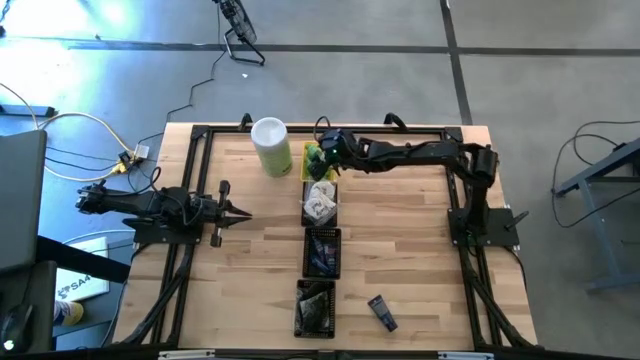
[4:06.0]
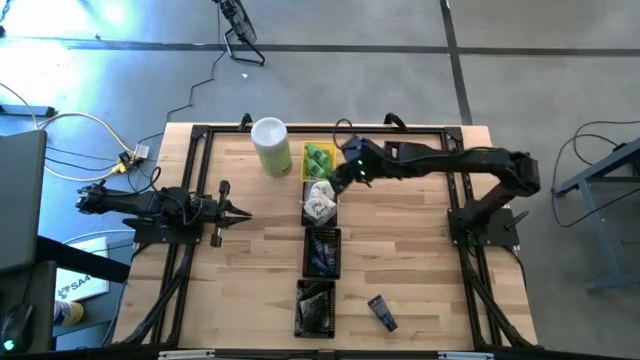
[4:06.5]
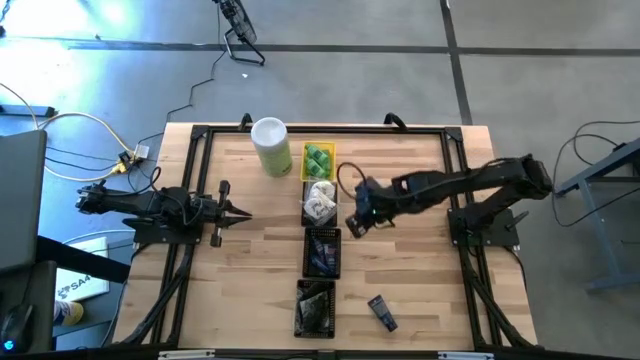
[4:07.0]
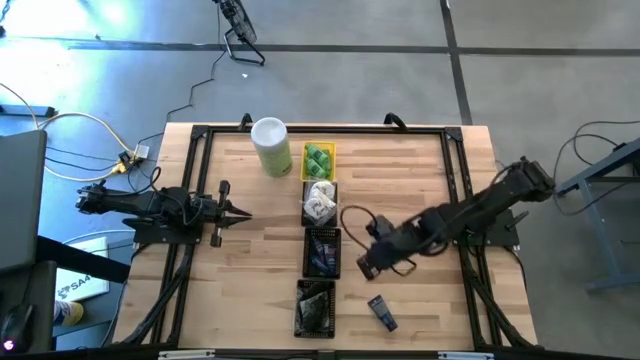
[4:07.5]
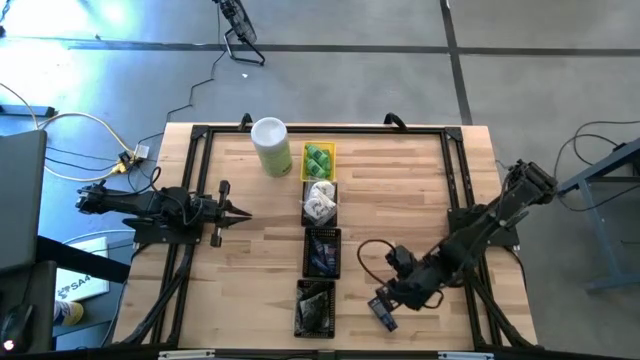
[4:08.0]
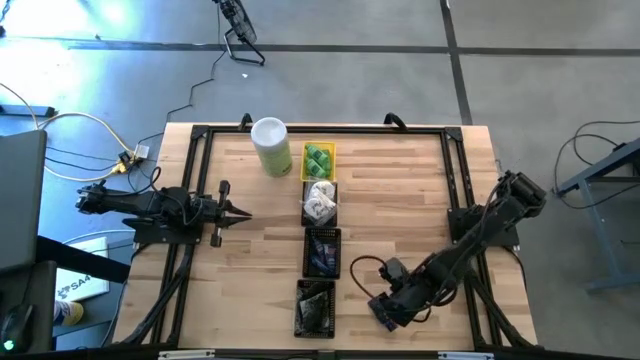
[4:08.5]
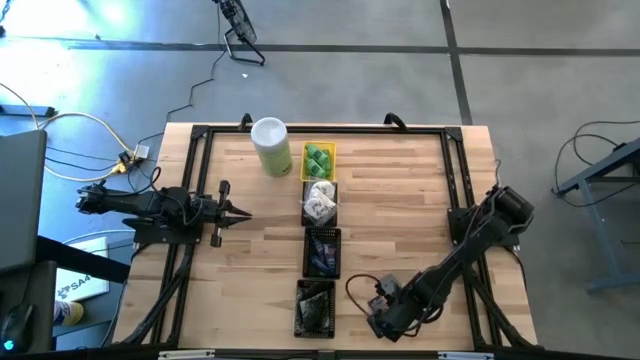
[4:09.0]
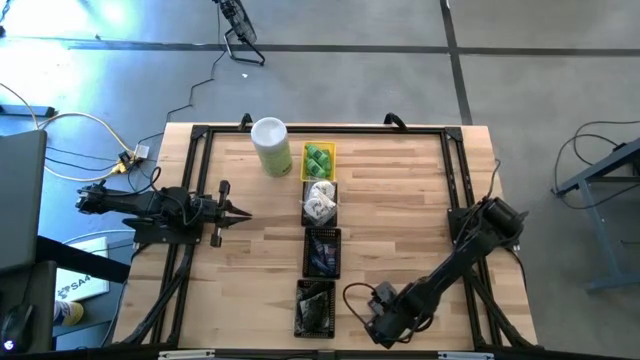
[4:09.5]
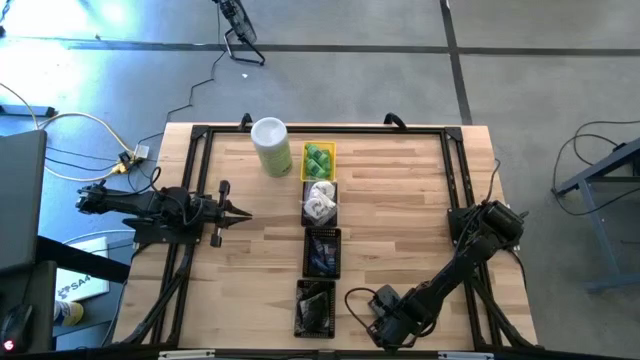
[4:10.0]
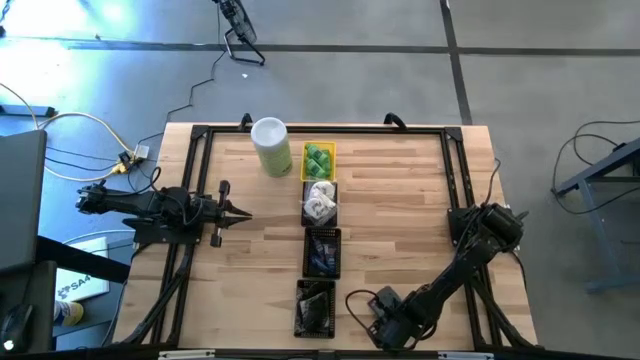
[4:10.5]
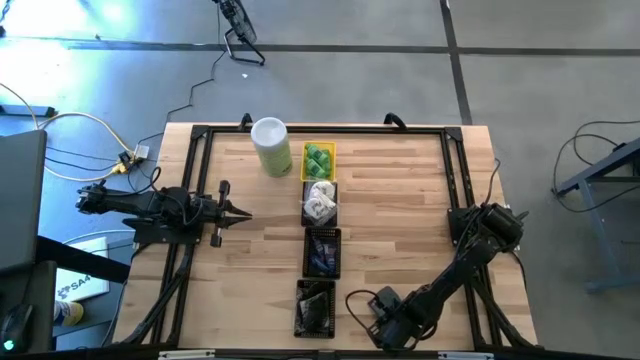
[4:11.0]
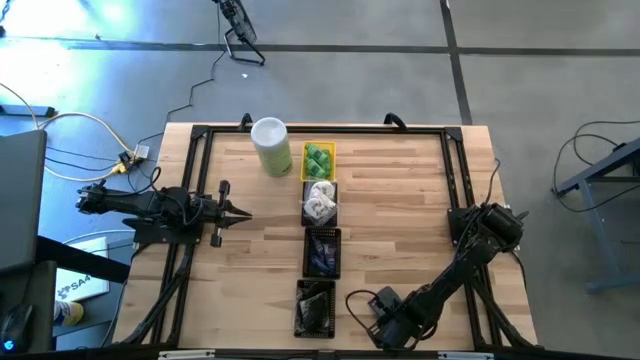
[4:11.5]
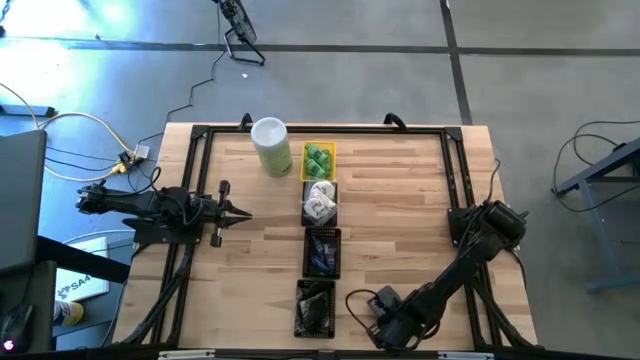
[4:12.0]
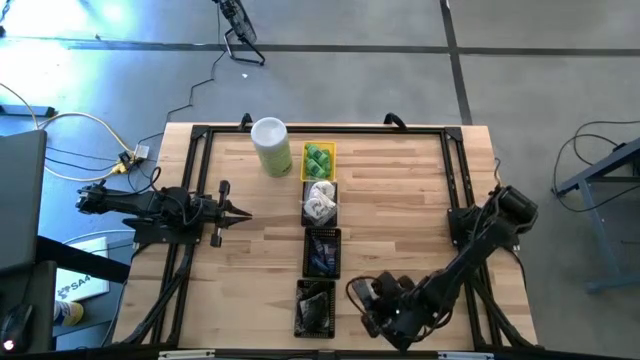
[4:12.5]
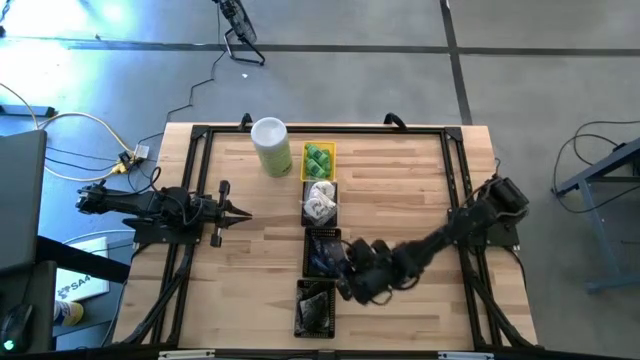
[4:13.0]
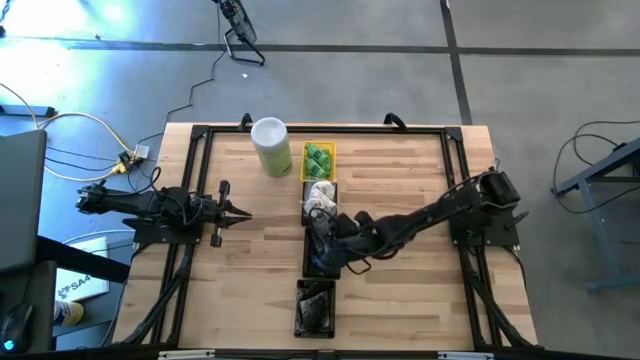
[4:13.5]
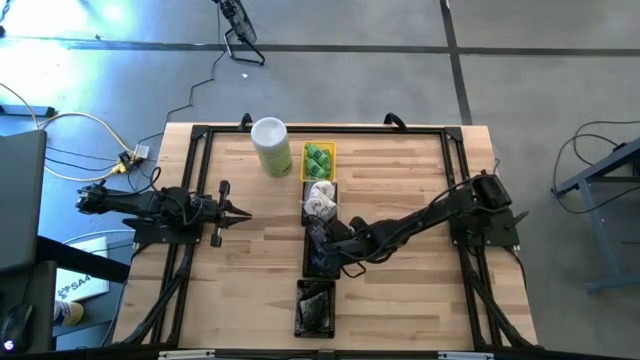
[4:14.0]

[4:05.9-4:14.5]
Task: Pick & Place Travel size toiletries
Put the dark blue bottle into the middle black basket

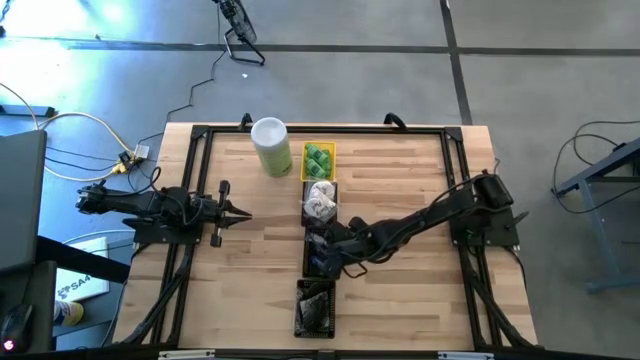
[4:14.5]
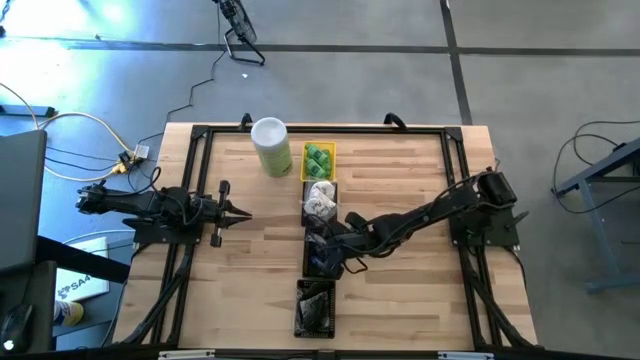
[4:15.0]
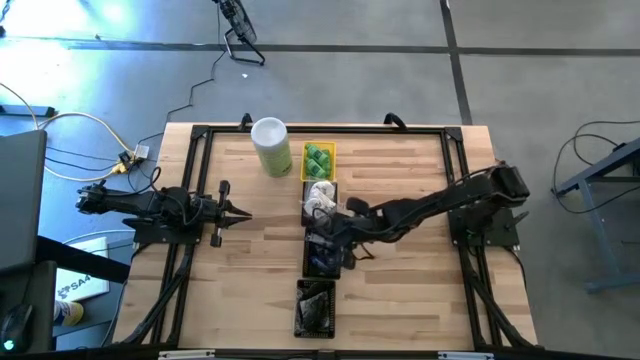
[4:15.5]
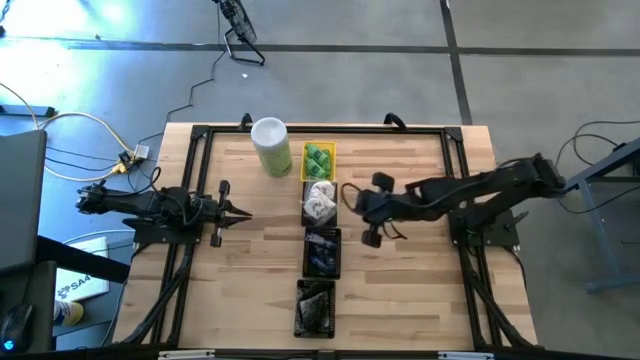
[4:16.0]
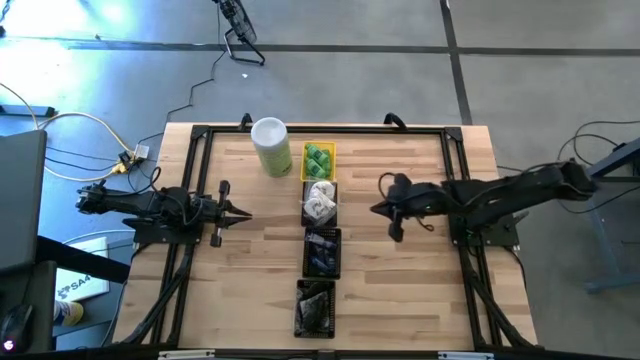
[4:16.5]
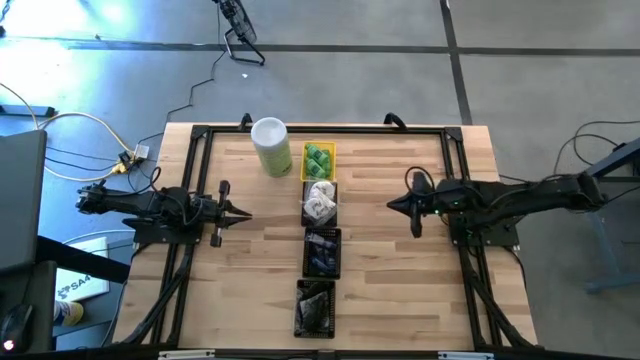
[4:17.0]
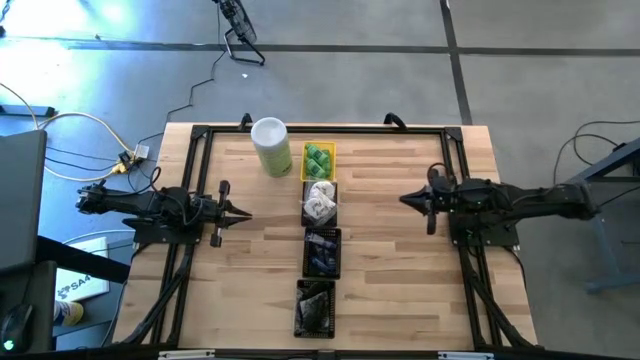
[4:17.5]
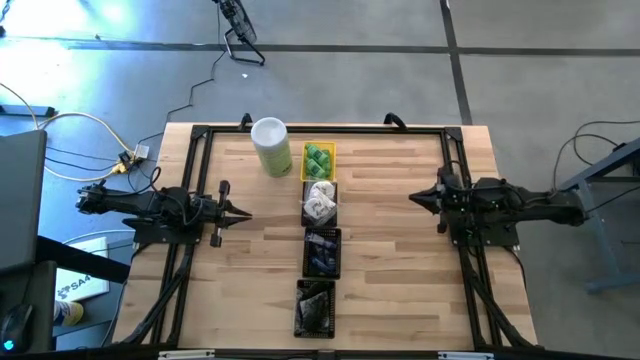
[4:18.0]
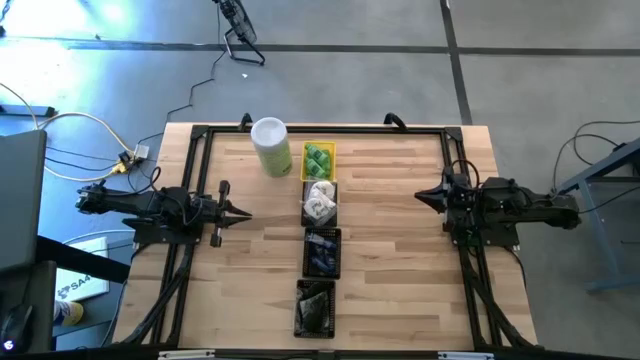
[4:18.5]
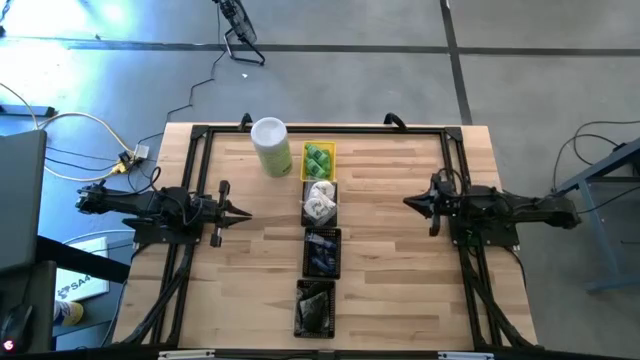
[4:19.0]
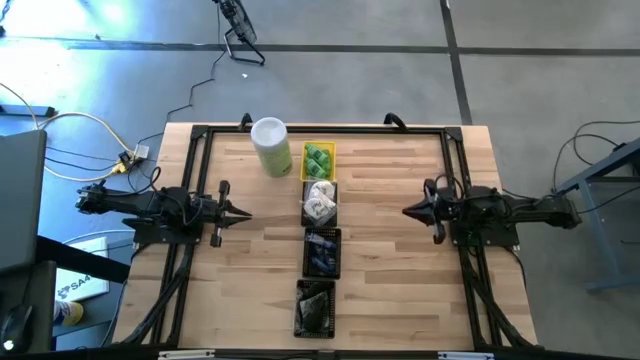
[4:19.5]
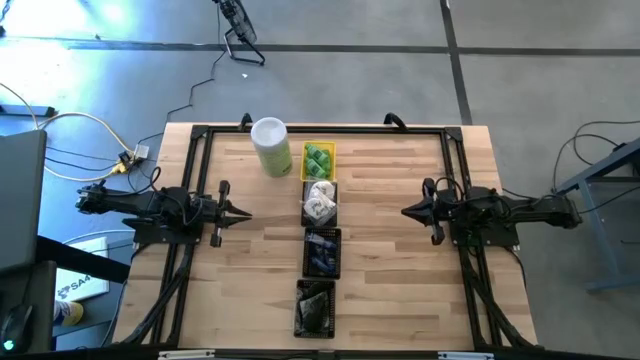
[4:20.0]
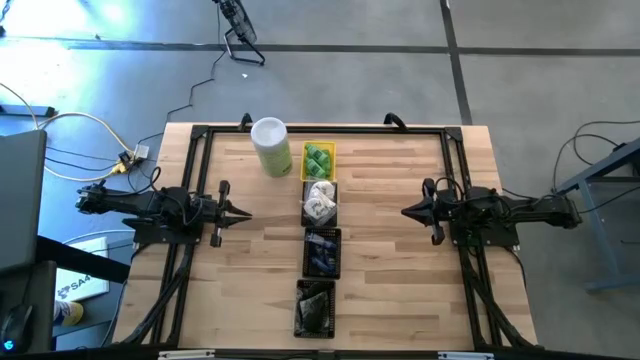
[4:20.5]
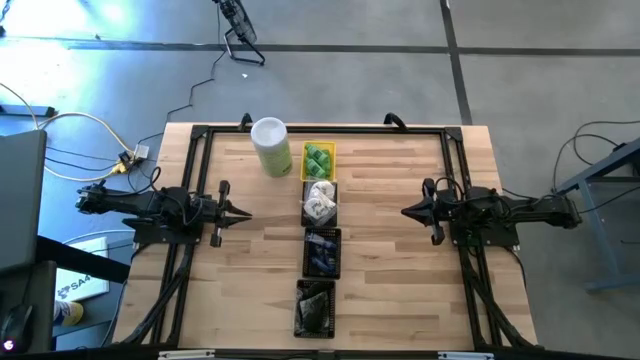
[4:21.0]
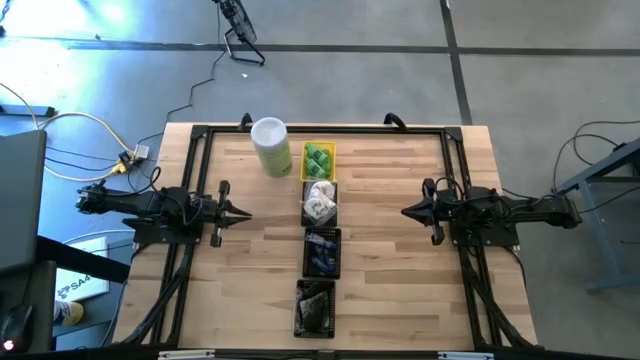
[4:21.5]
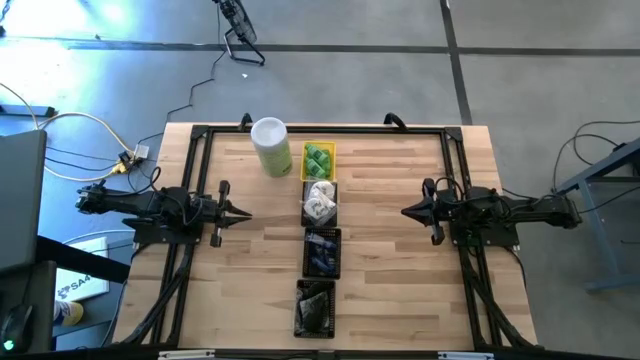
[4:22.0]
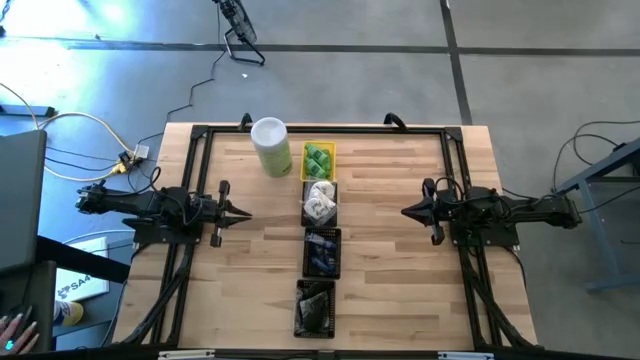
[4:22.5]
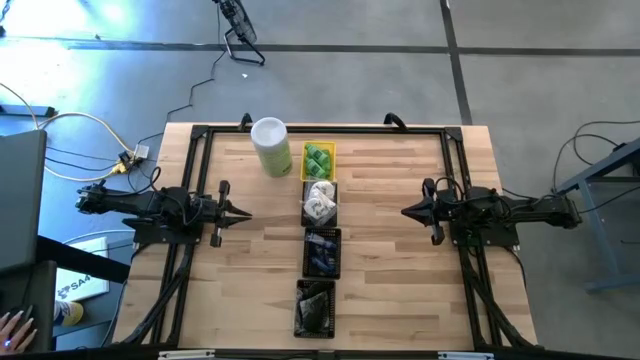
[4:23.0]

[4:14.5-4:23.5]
Return to Home Position

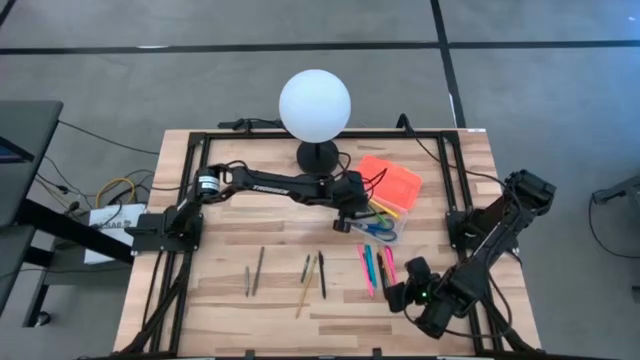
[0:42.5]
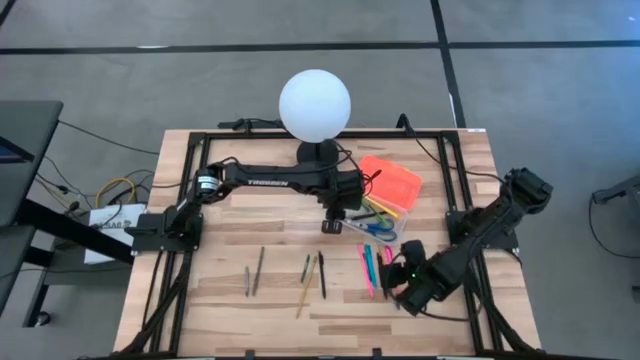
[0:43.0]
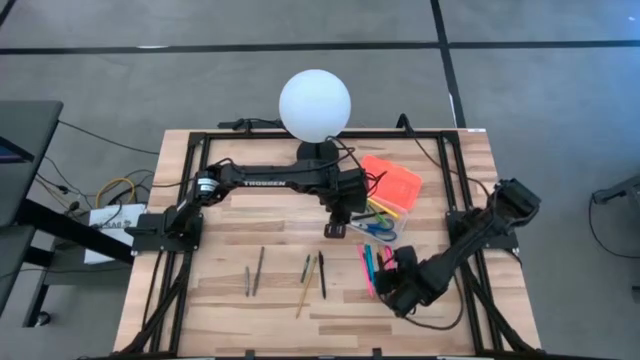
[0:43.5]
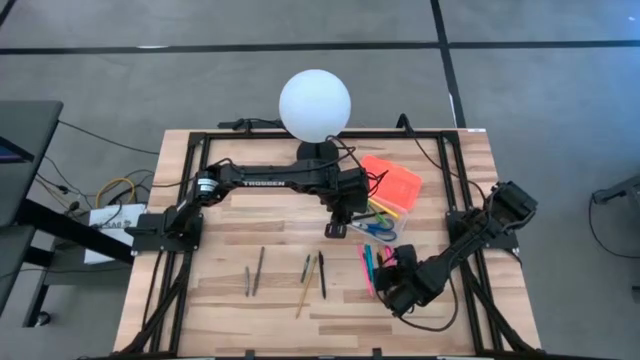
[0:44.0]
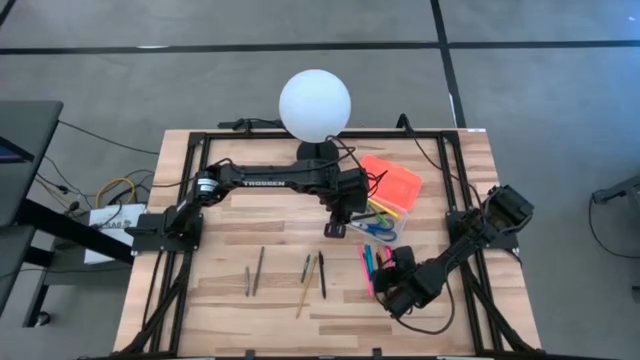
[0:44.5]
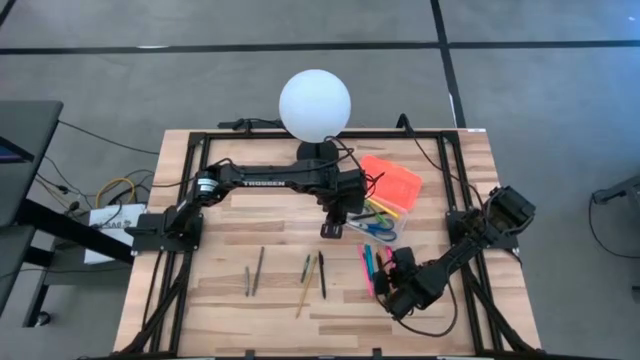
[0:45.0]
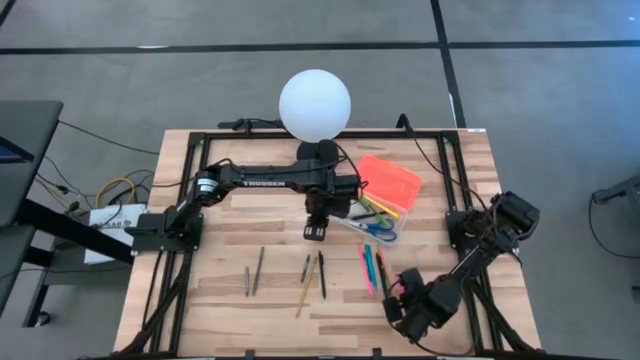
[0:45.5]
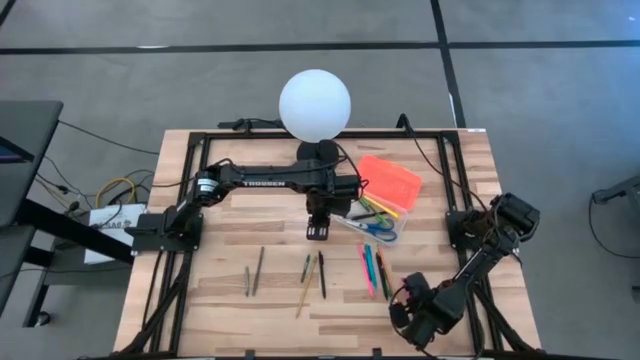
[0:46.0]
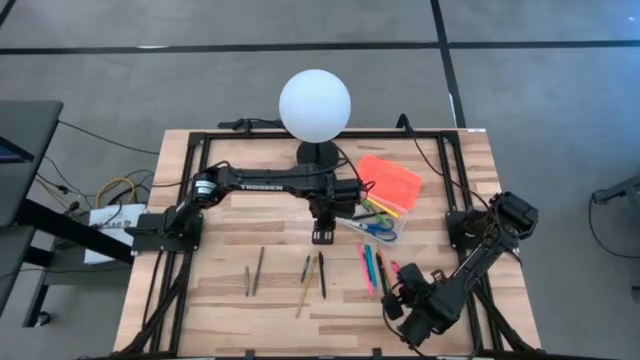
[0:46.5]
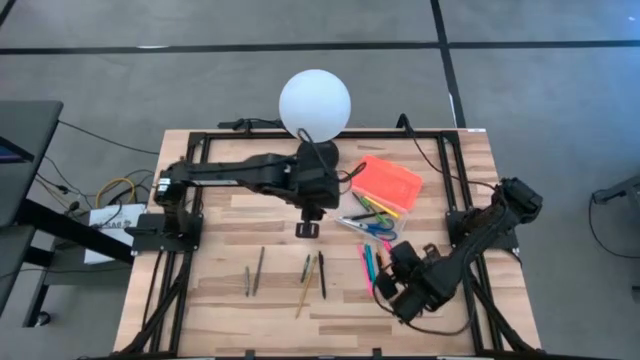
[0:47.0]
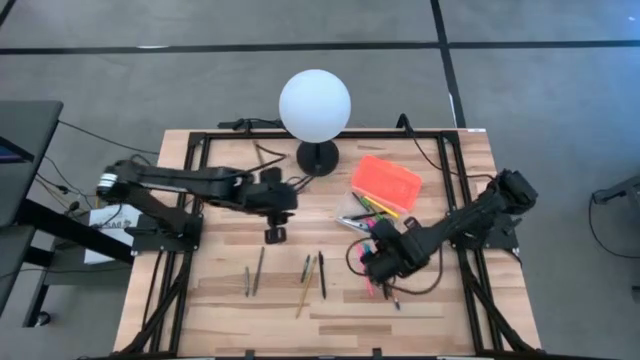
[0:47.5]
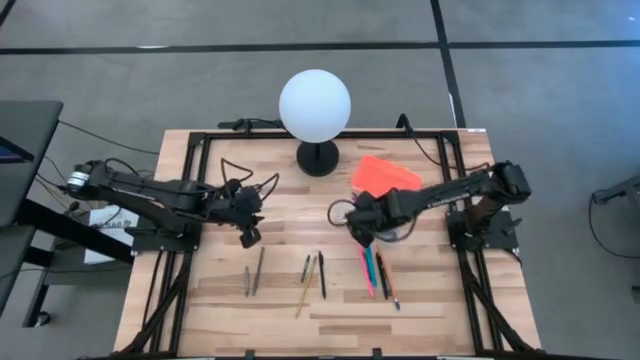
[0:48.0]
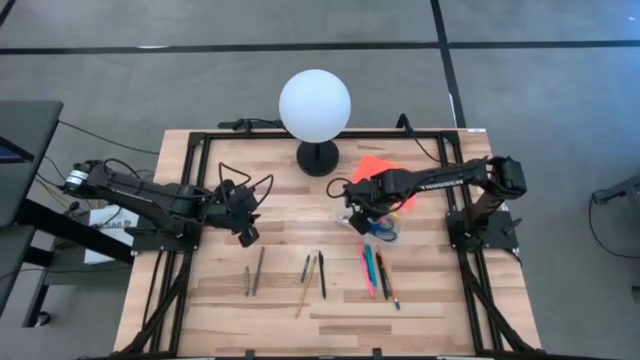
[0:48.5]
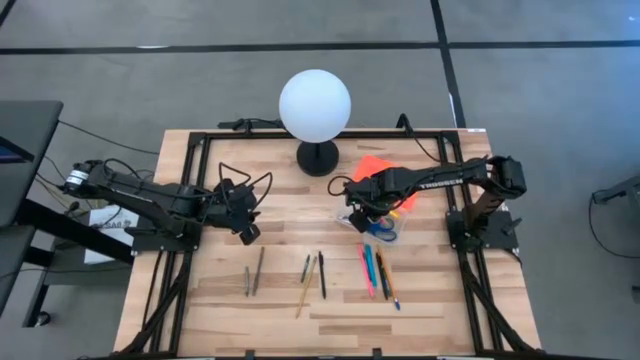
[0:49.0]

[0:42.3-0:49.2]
Task: Pick & place school supplies into a supply box
Put the pink pen into the orange supply box
